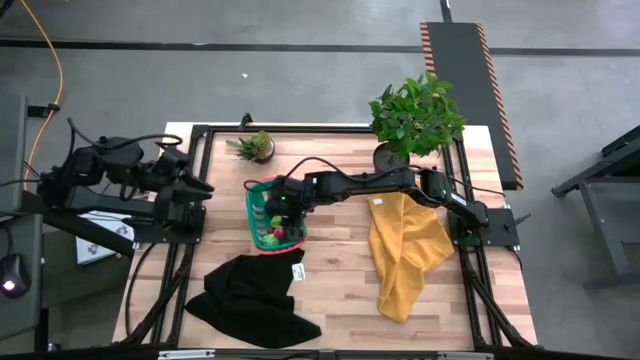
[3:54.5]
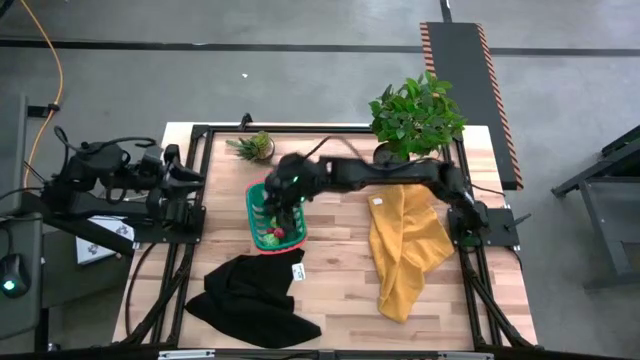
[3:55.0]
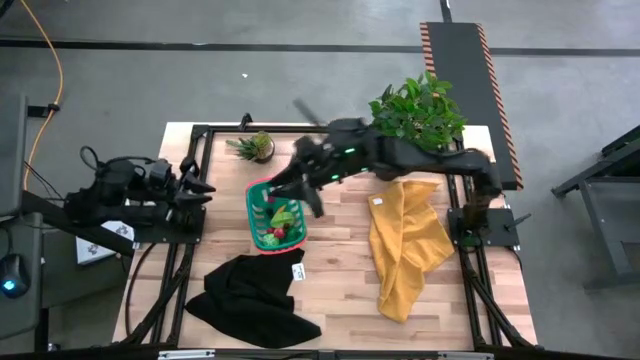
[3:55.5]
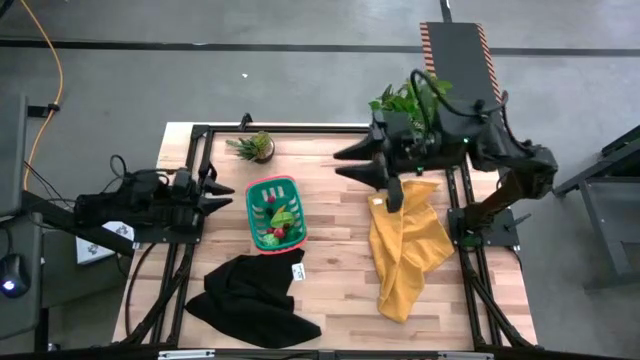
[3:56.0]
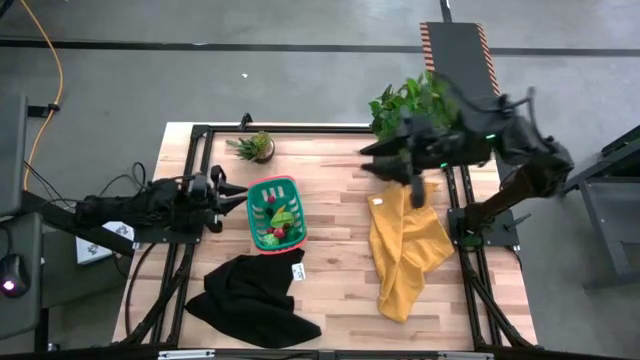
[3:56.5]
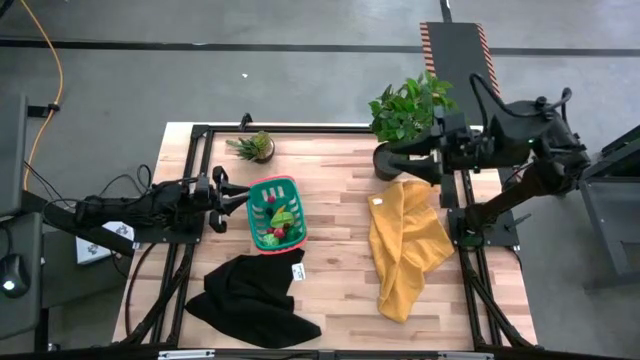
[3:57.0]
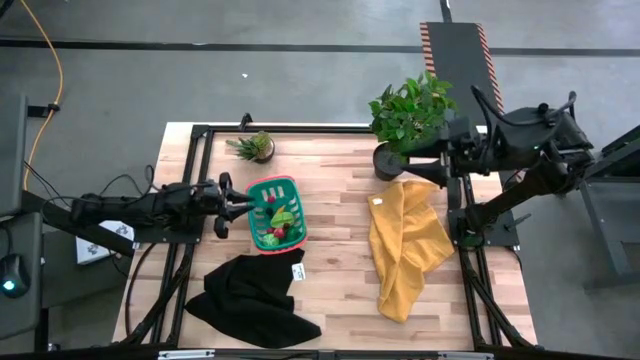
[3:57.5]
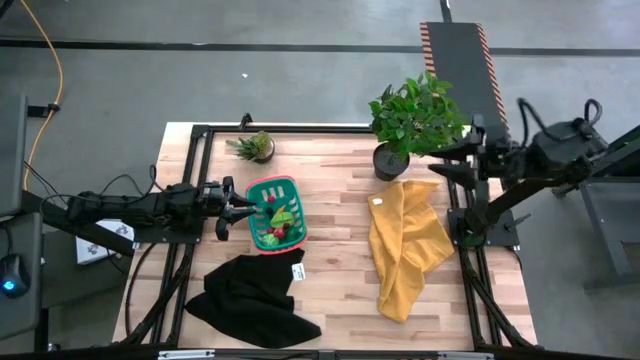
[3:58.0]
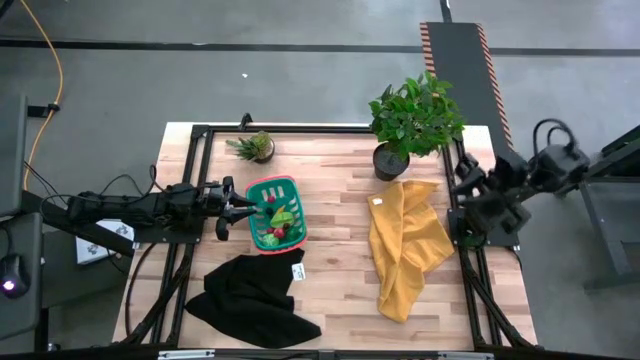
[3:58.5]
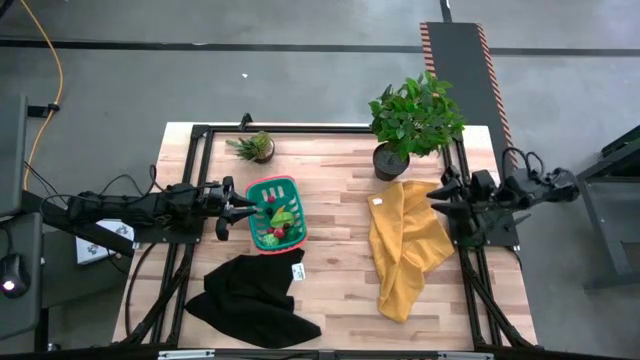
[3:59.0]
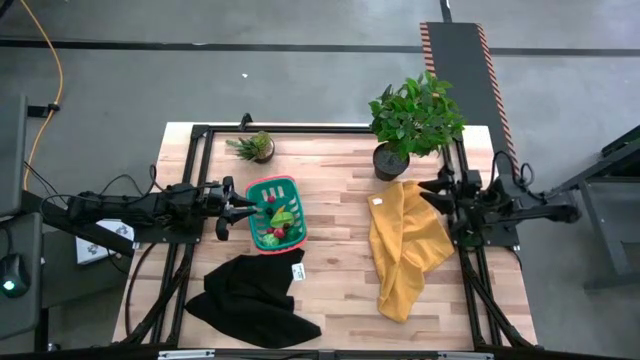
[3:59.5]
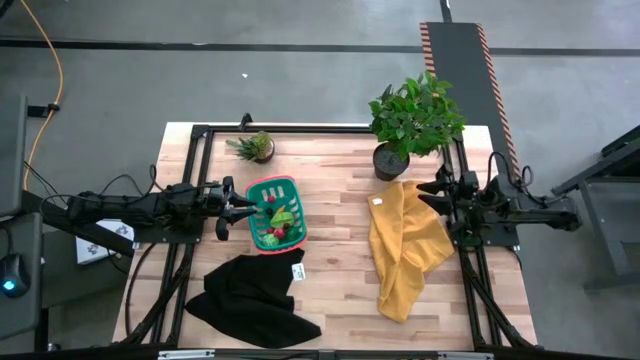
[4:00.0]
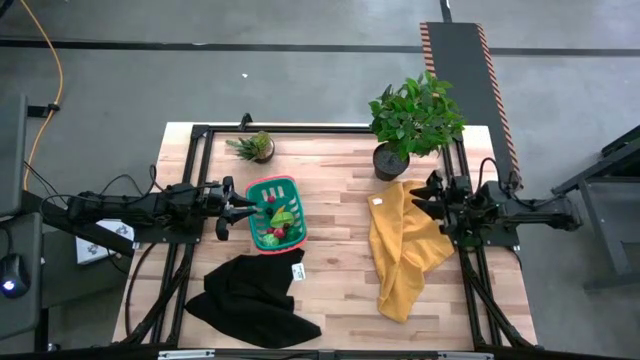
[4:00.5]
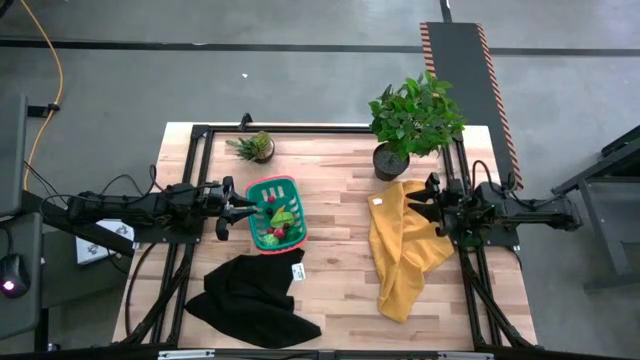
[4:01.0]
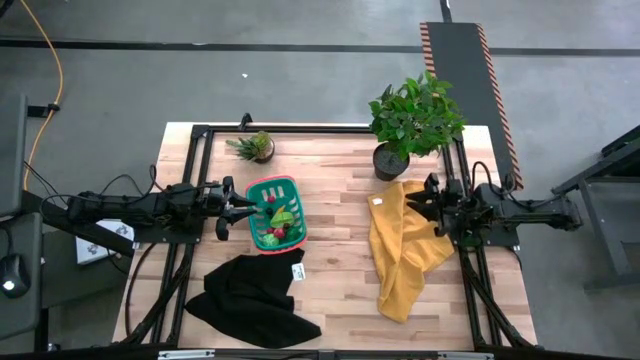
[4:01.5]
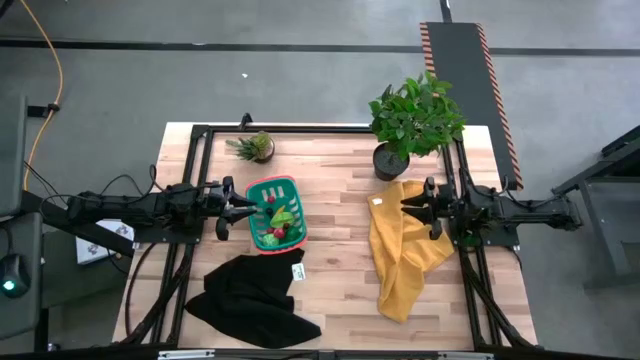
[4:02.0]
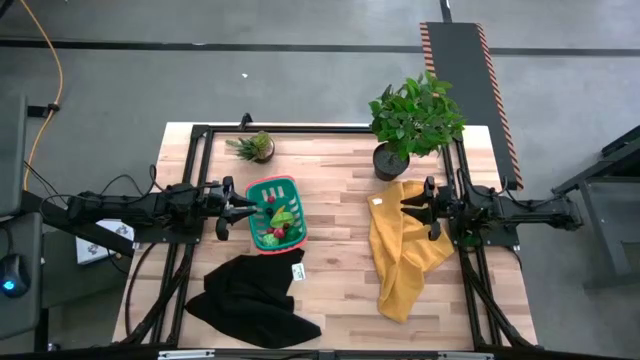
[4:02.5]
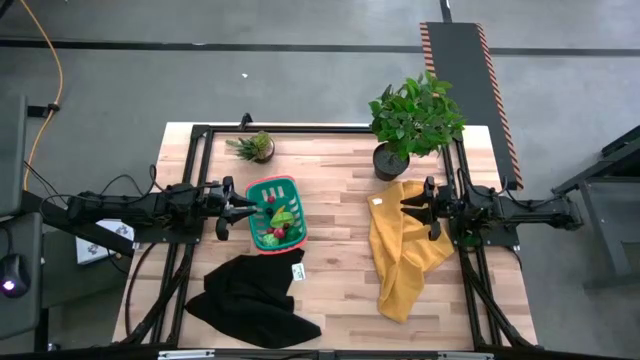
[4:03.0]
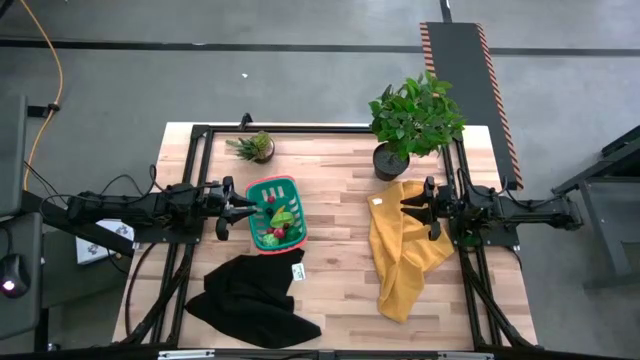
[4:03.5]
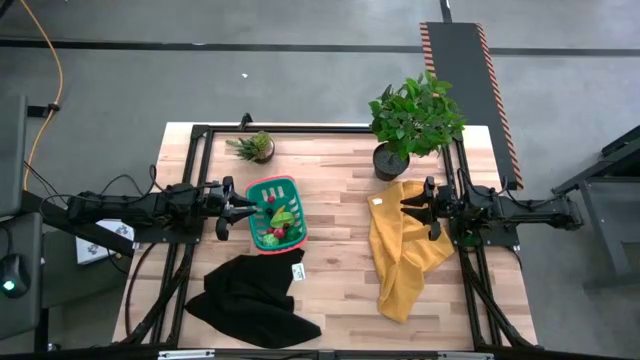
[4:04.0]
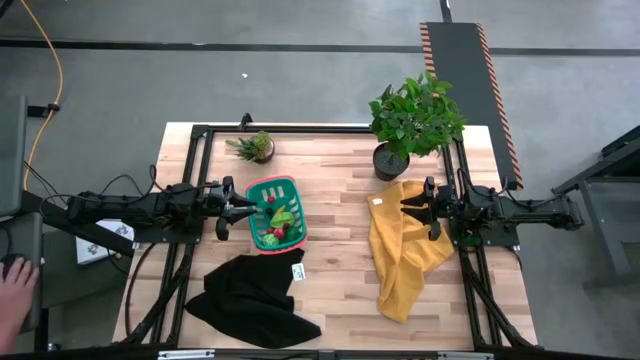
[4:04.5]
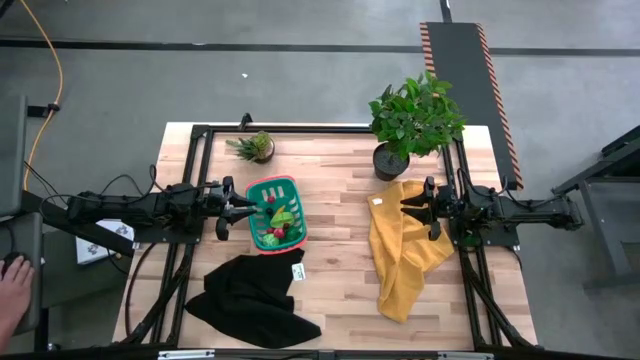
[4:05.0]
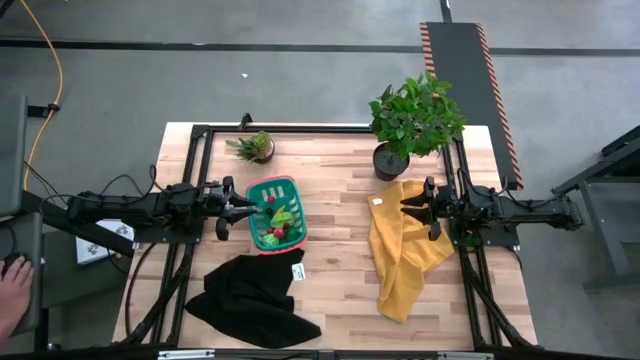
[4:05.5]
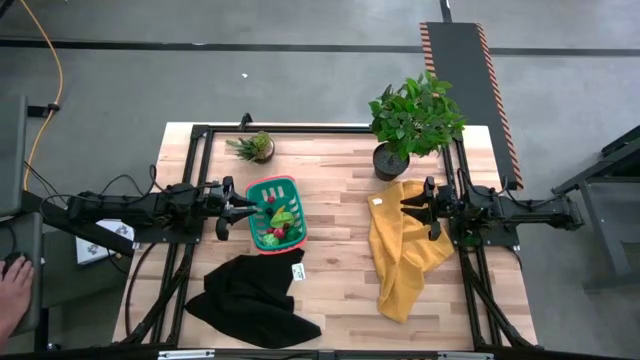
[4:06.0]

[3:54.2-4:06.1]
Task: Pick and placing Produce into tupperware
Return to Home Position

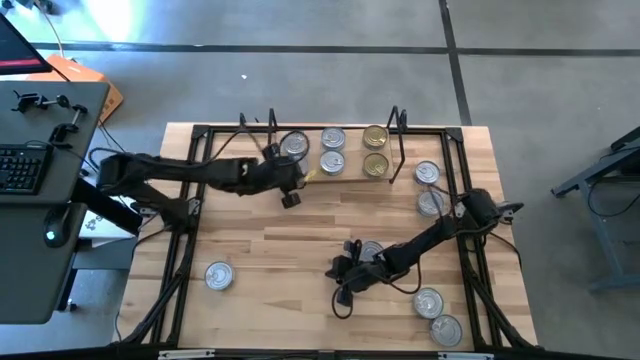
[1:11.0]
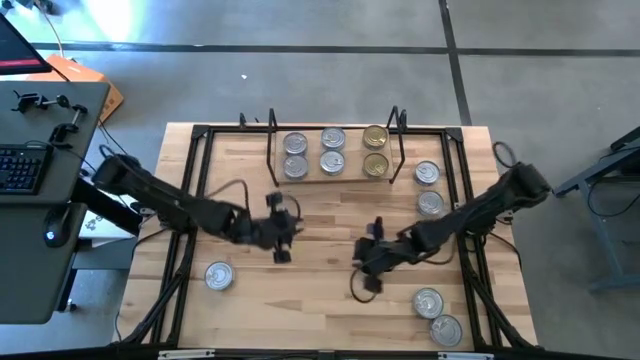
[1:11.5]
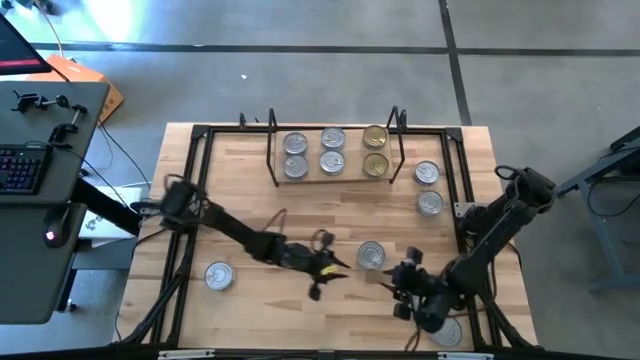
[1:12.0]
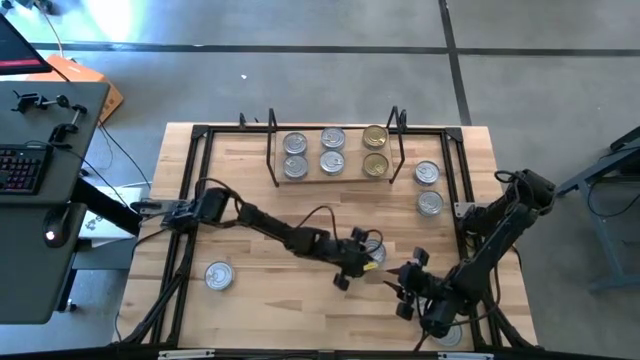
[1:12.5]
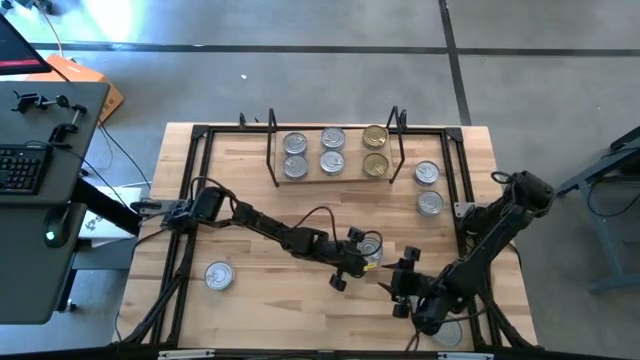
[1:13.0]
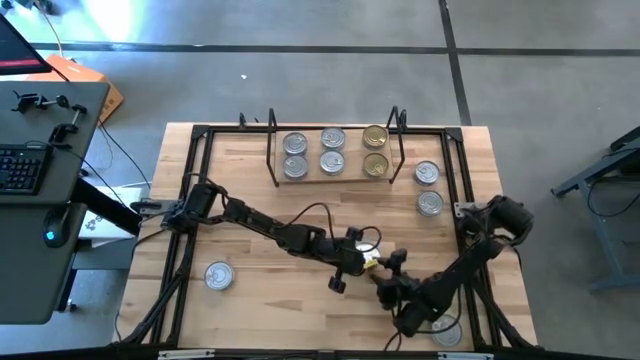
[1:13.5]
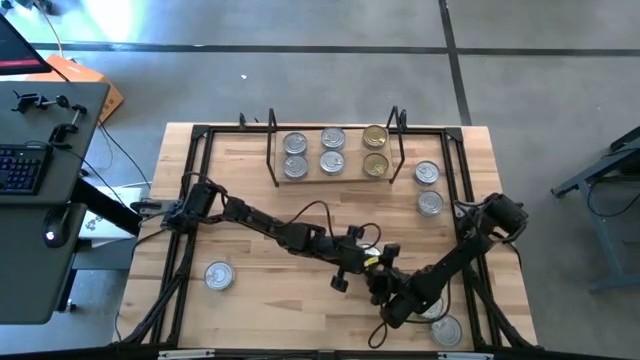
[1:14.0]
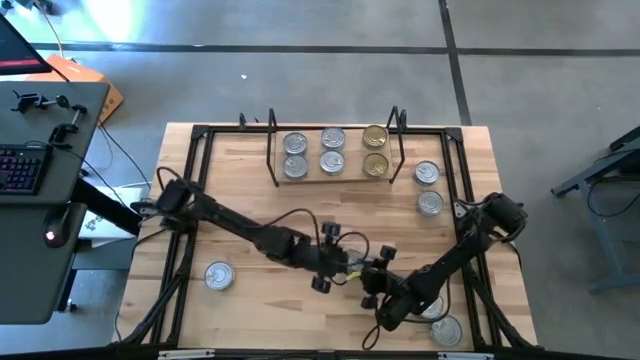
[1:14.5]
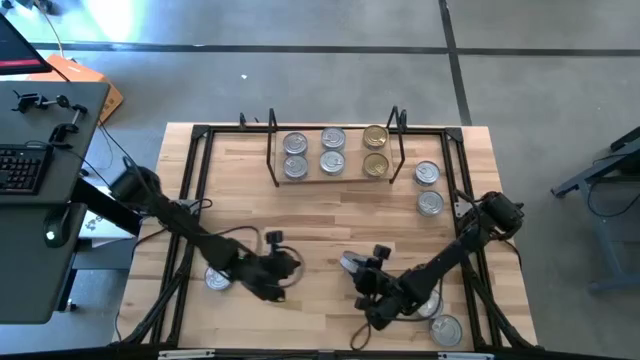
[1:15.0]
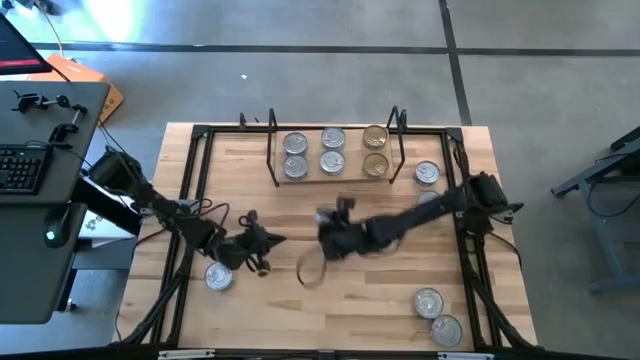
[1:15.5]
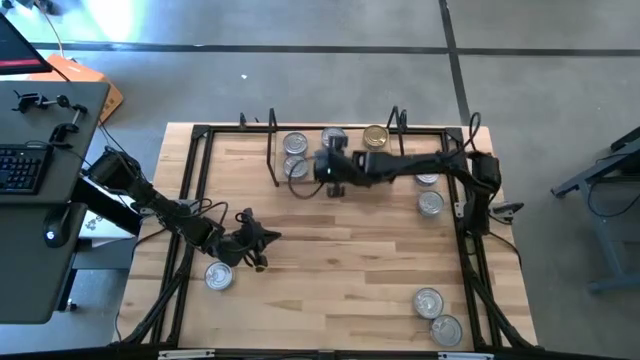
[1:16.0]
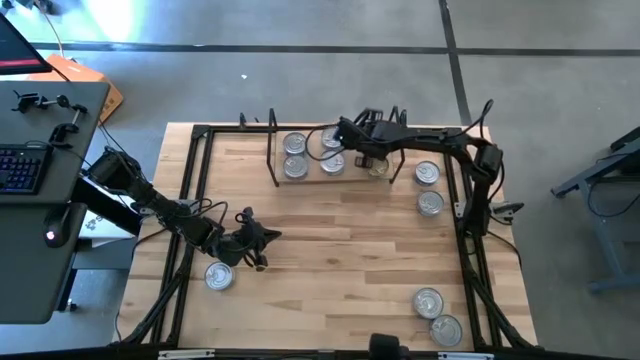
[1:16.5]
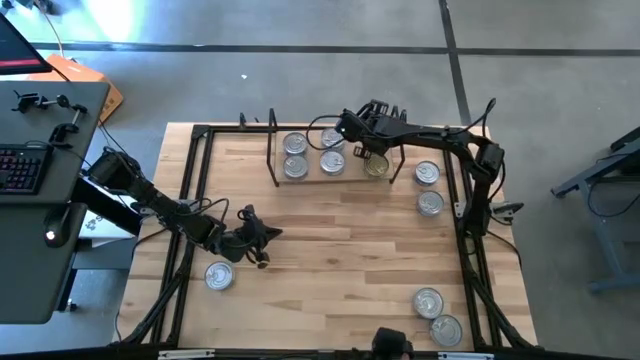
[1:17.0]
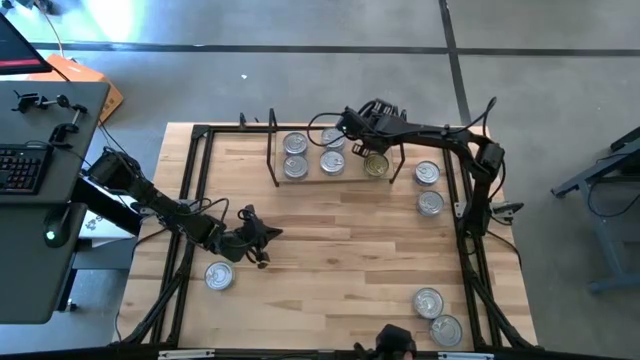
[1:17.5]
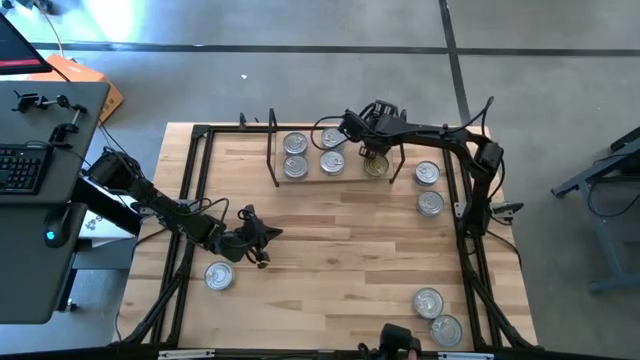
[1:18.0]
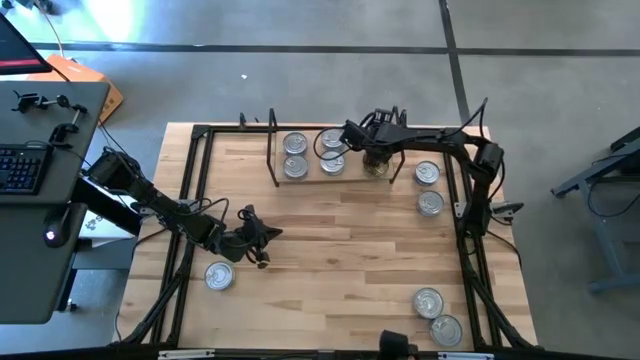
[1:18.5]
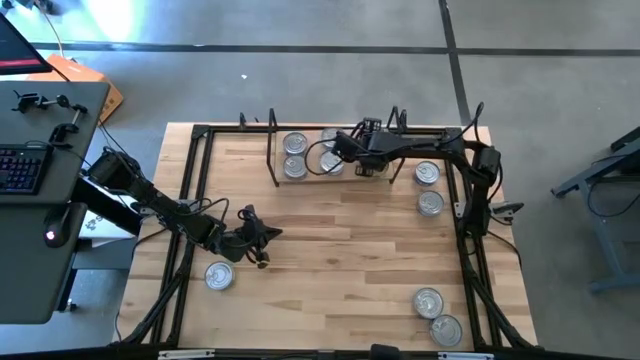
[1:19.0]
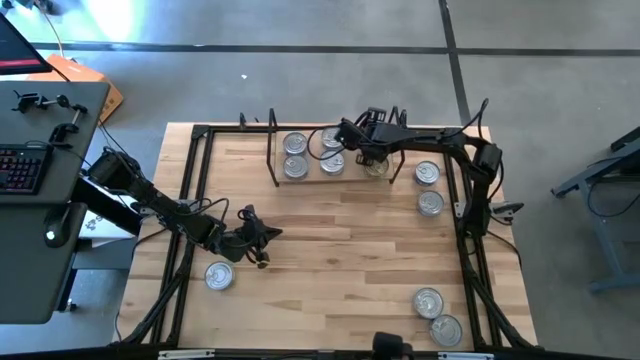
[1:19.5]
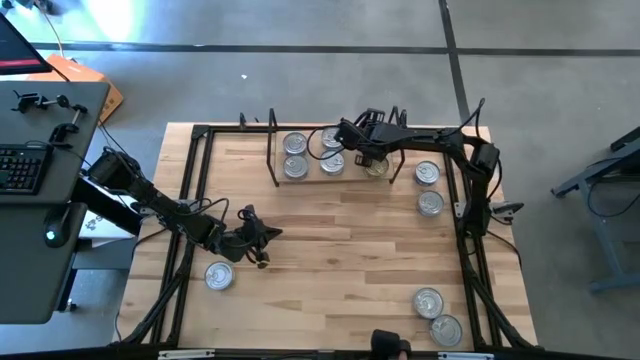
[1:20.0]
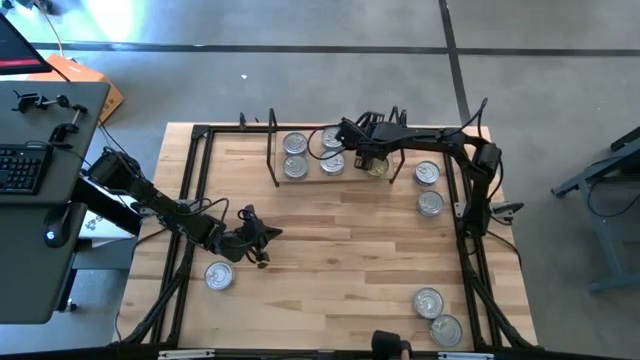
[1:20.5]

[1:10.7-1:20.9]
Task: Stack canned seafood by type on shelf
Stack the light green tuna can on top of the light green tuna can on the shelf
